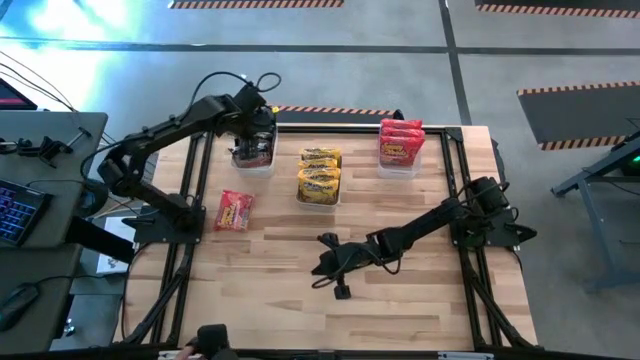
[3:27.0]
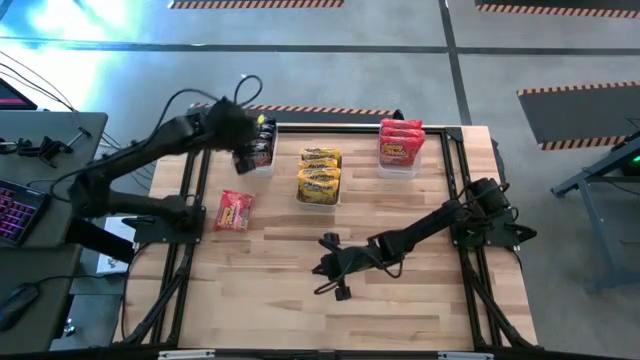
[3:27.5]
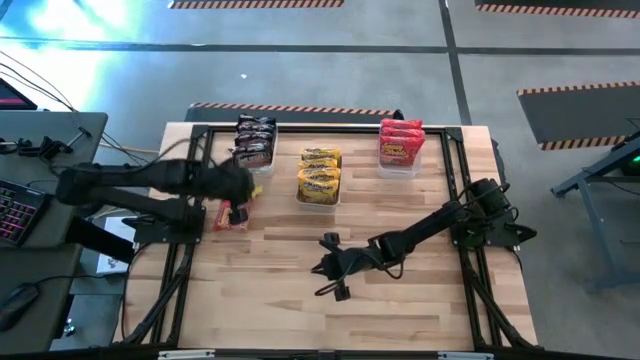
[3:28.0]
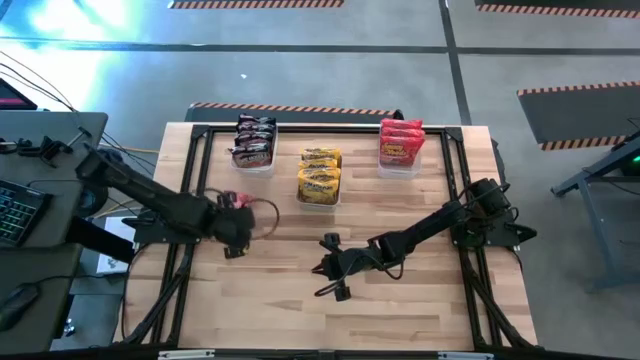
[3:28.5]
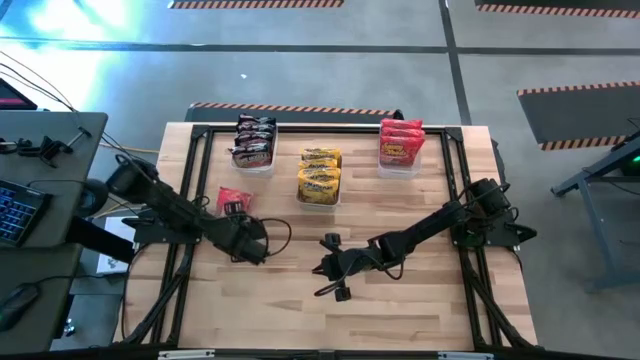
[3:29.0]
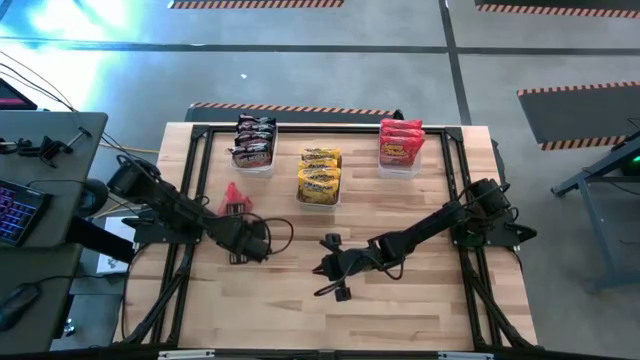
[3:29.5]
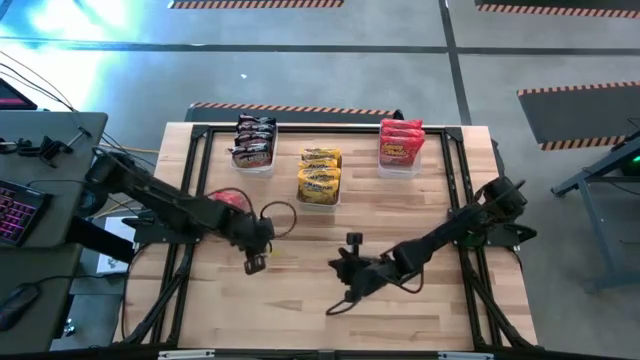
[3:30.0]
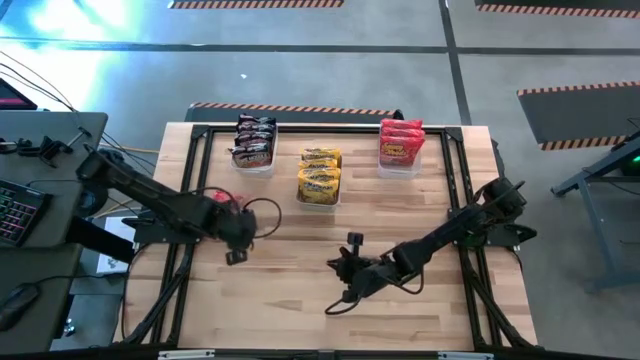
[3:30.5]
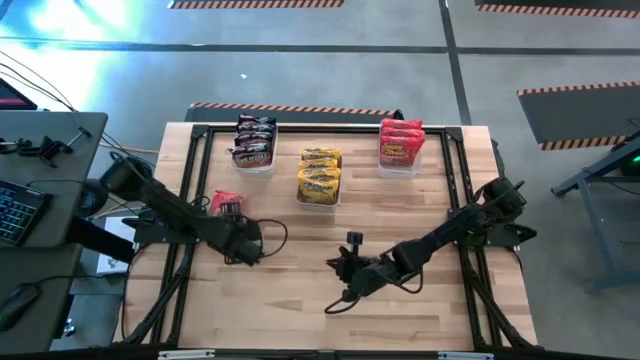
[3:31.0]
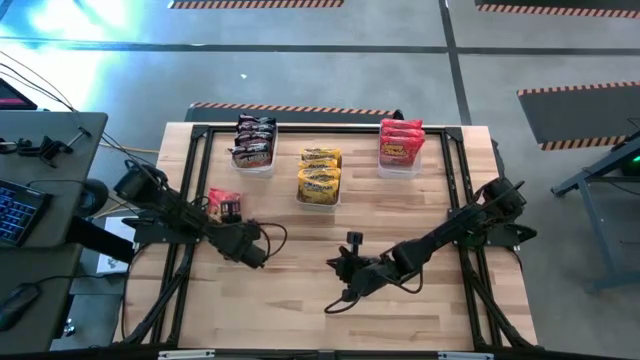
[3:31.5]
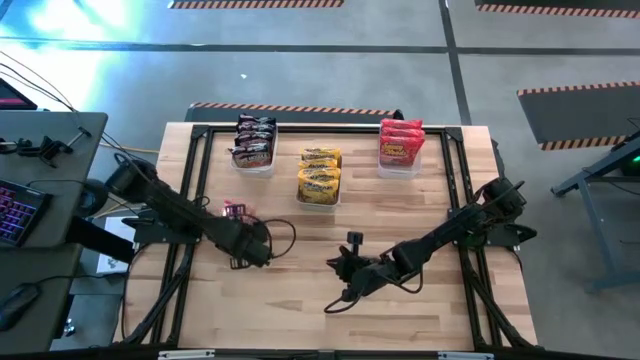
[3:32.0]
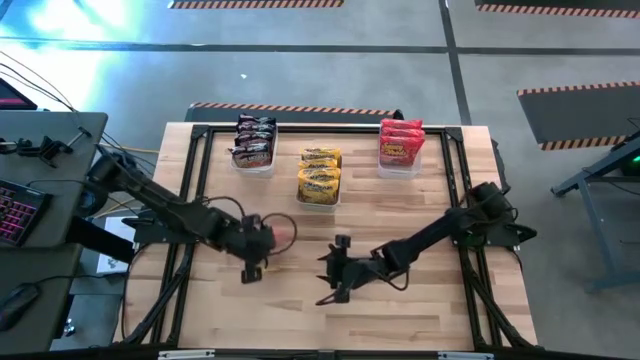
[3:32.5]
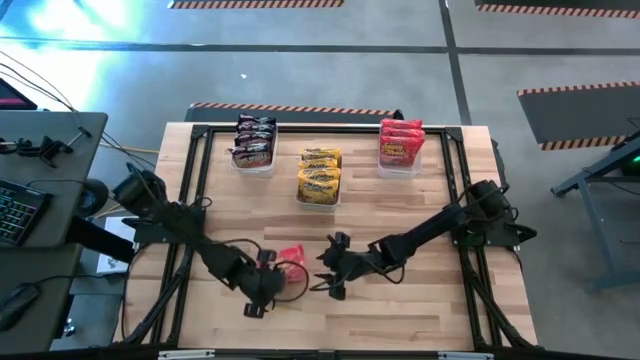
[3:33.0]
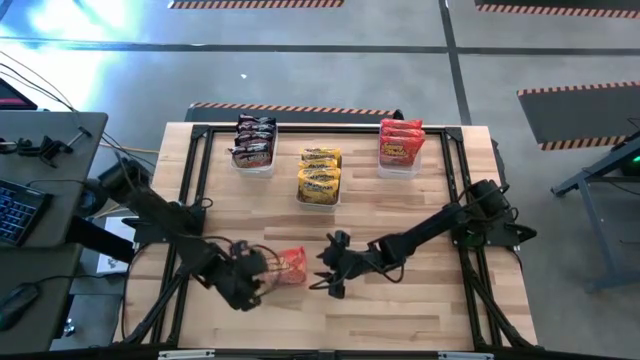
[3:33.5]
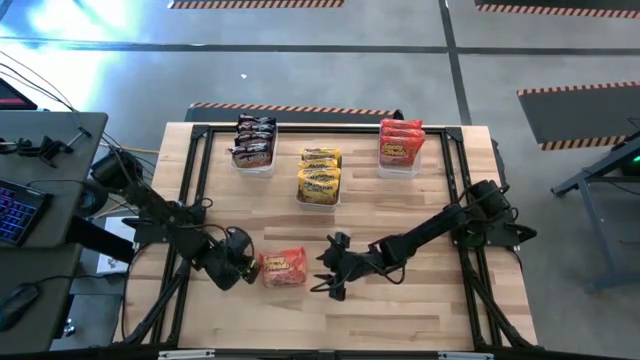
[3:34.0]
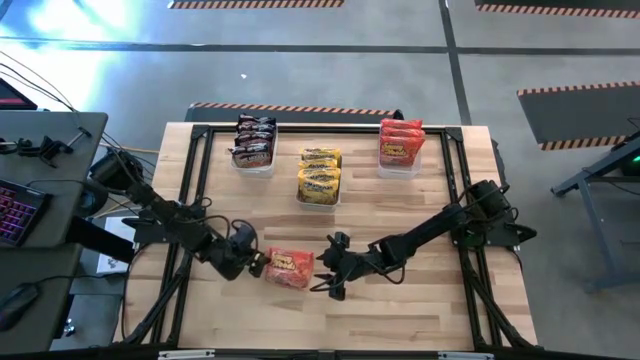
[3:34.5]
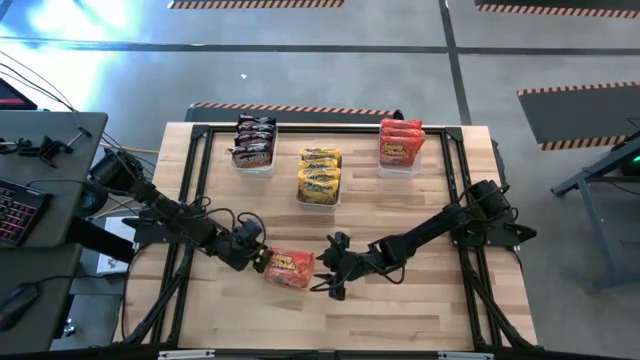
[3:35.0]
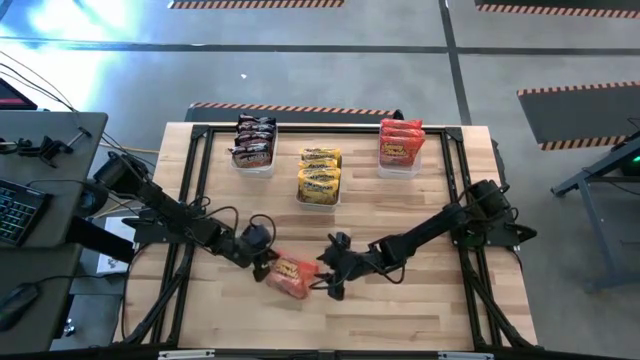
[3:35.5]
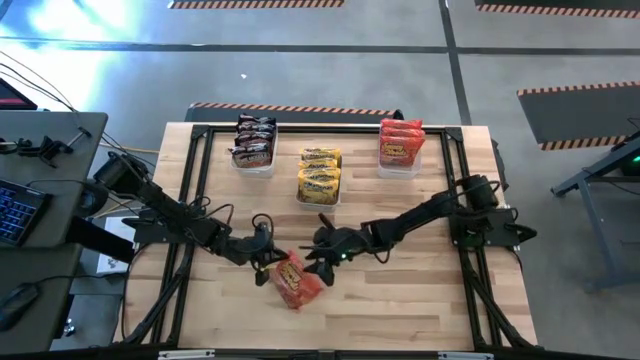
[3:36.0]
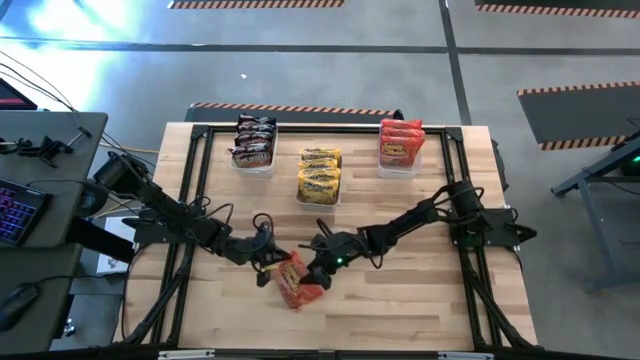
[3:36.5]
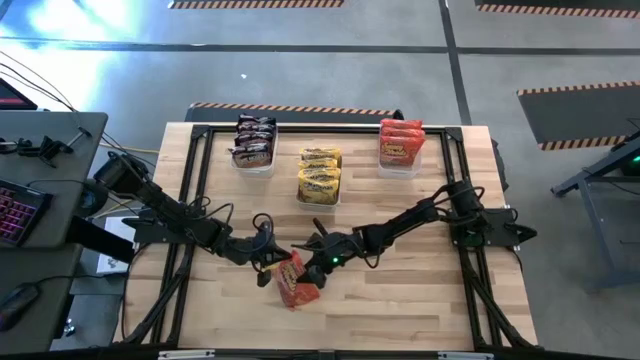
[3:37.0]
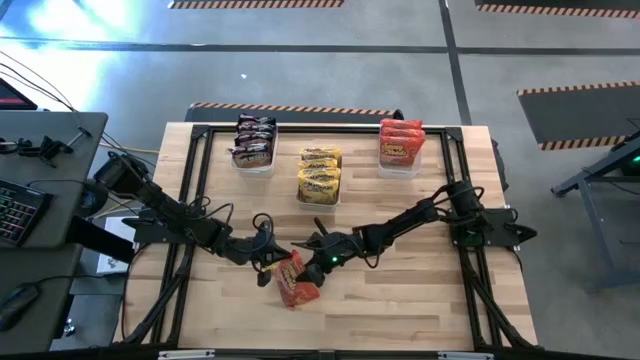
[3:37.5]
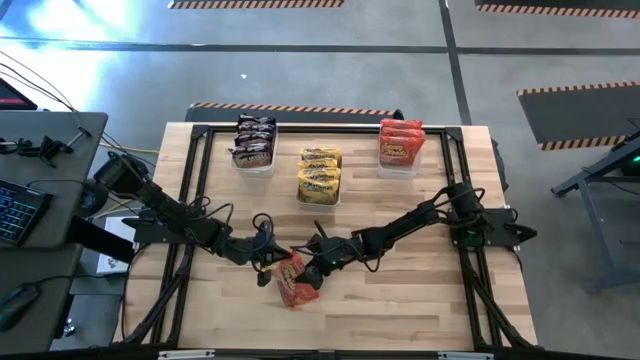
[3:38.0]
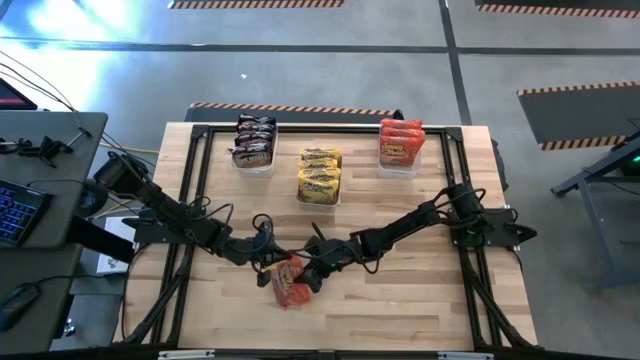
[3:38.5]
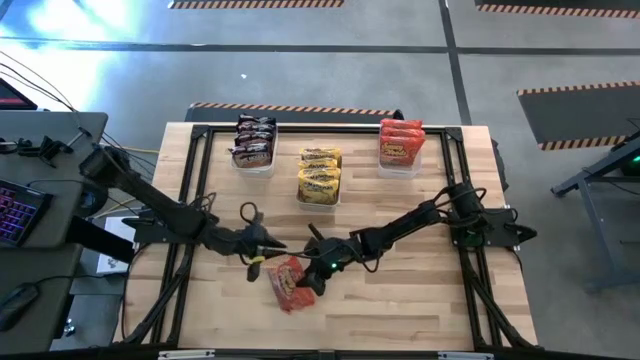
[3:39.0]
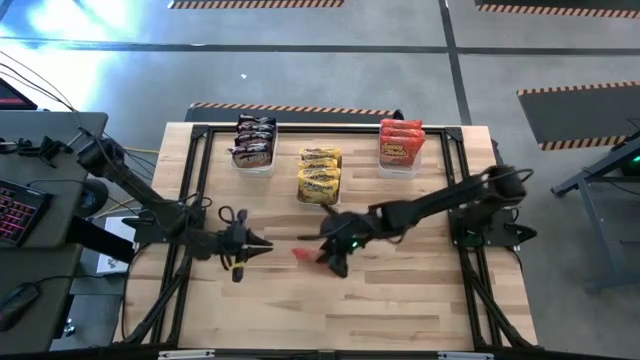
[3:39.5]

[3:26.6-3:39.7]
Task: Sort Maruchan noodles
Put the orange noodle pack into the transparent bin

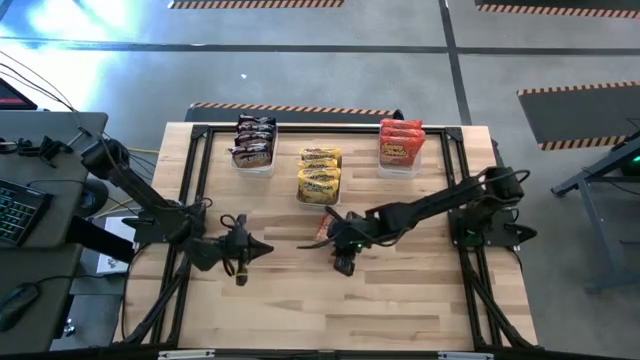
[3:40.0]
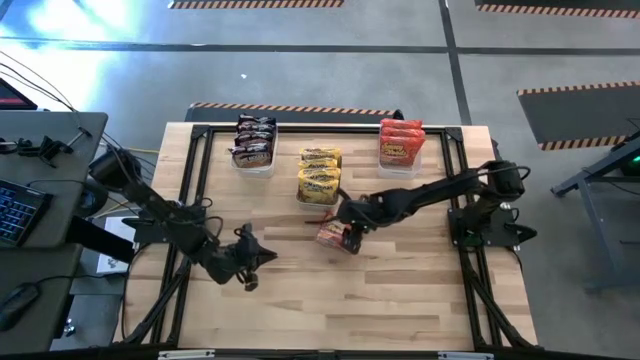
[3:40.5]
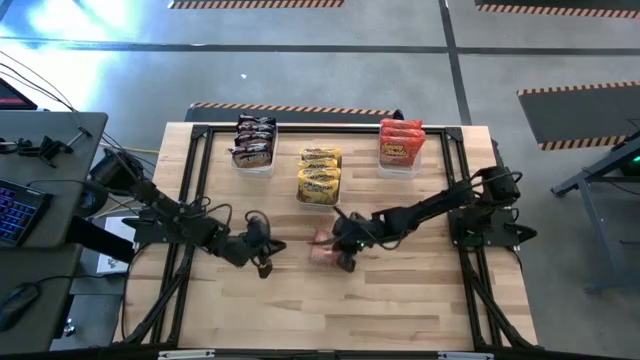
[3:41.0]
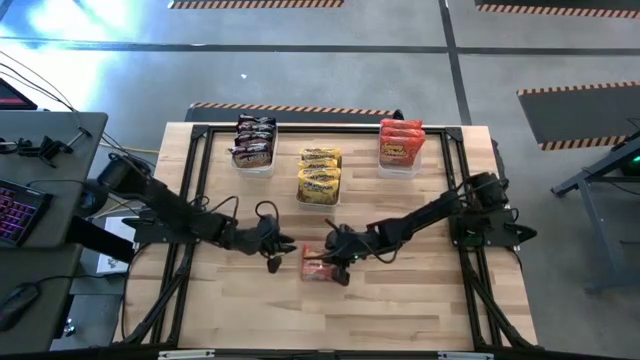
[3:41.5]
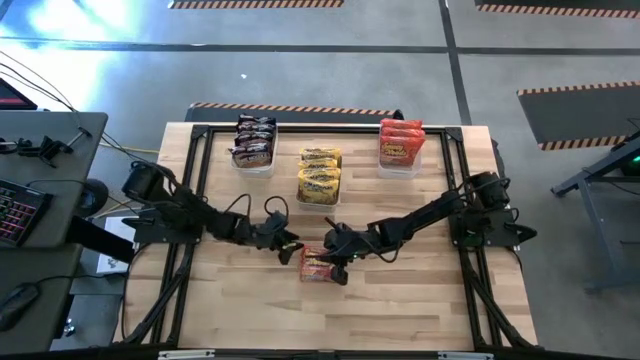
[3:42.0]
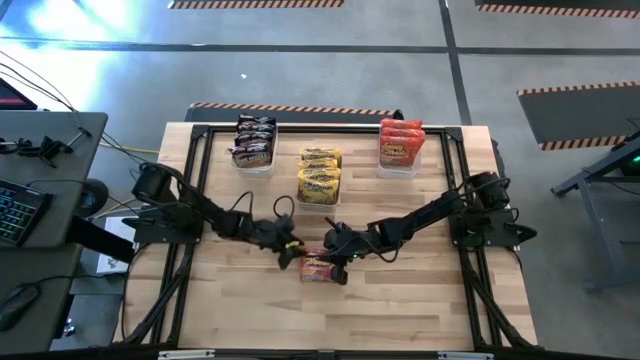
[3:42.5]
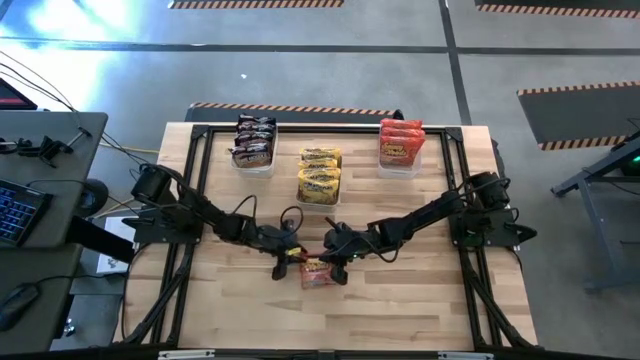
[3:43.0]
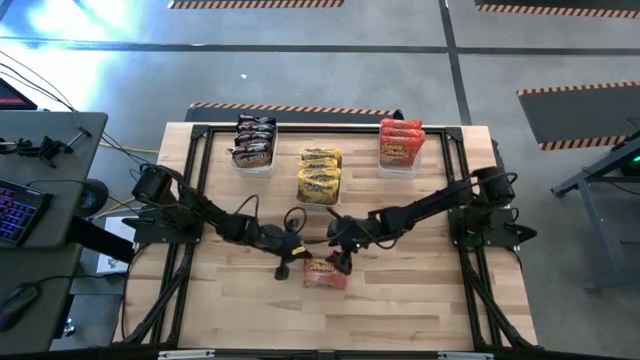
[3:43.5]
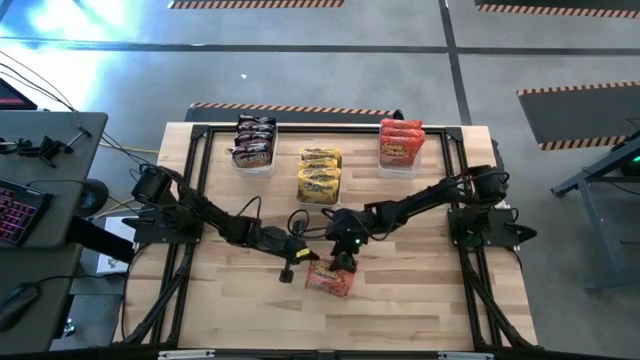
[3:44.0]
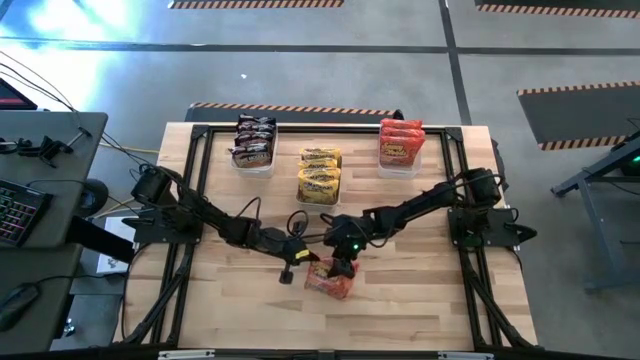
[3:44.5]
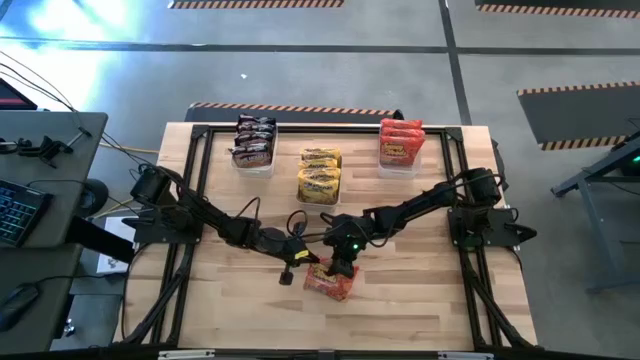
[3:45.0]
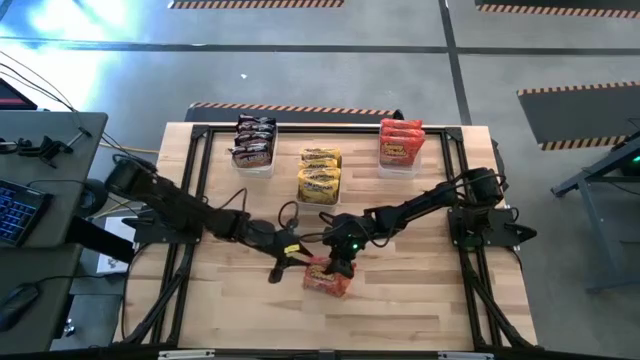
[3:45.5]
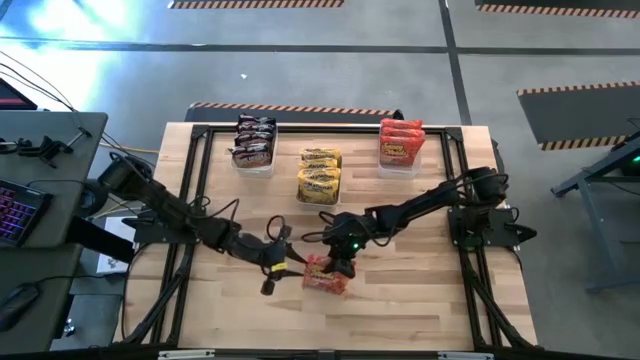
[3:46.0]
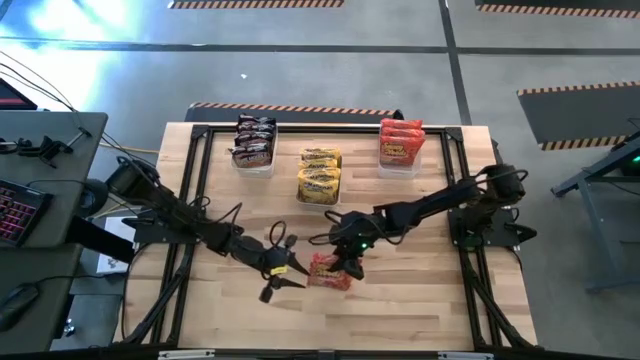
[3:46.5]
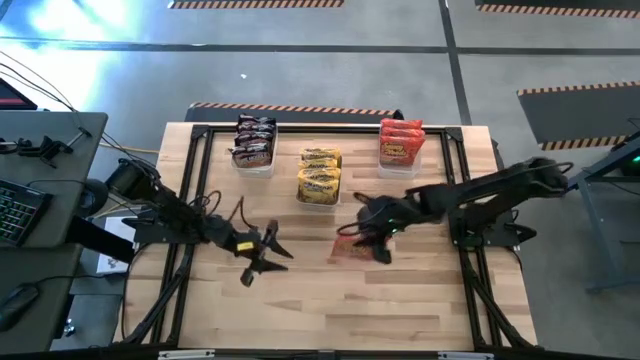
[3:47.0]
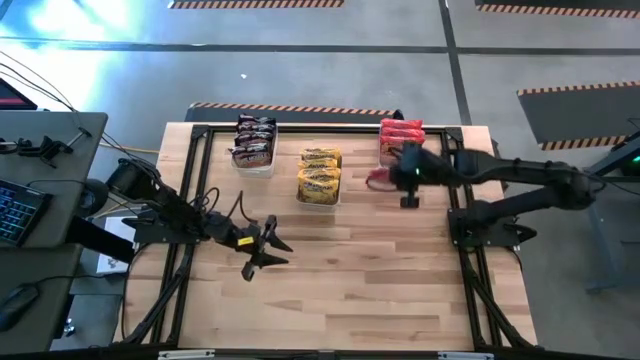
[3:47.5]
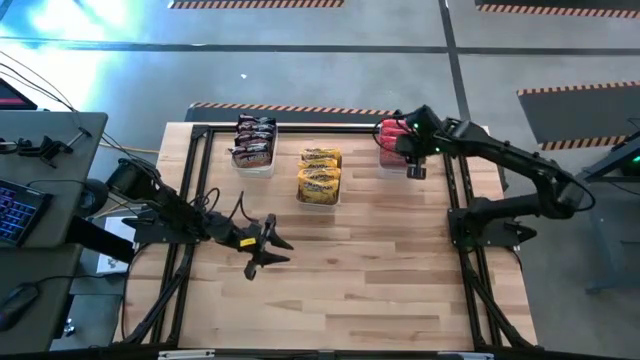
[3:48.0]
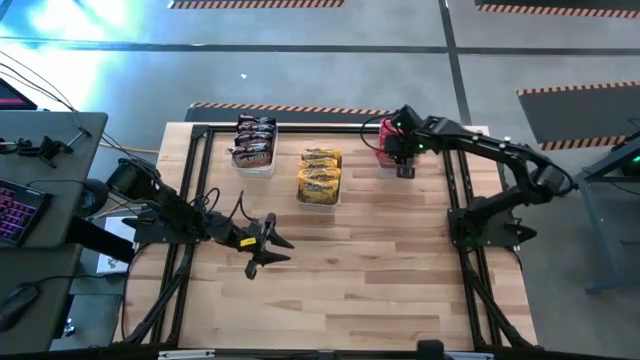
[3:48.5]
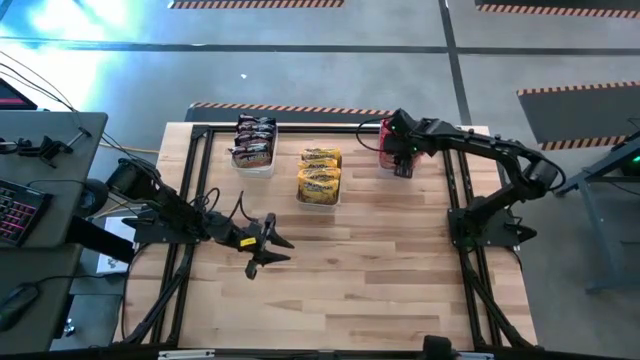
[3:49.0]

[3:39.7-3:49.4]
Put the orange noodle pack into the transparent bin
